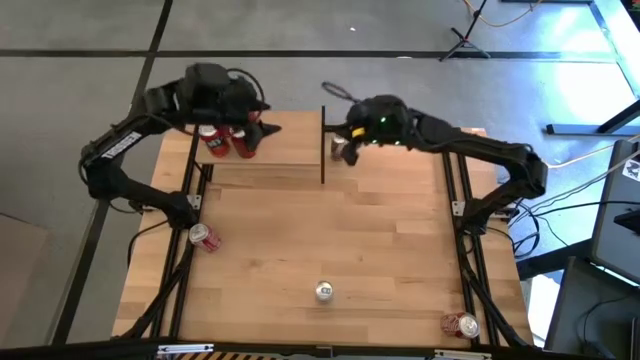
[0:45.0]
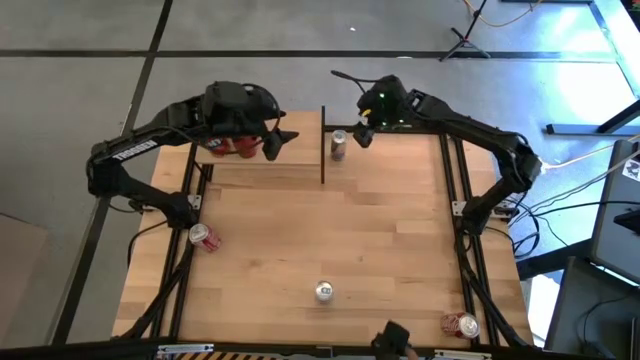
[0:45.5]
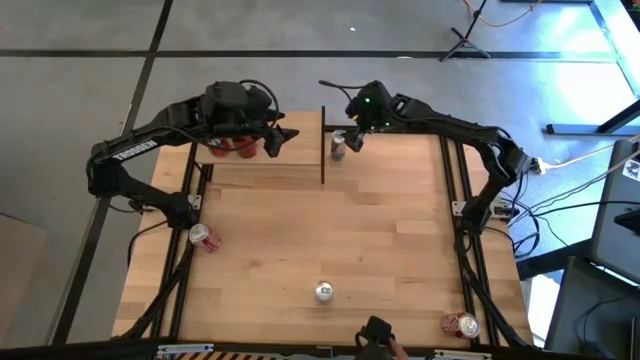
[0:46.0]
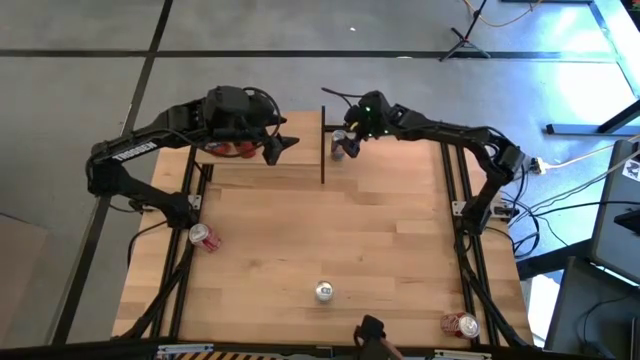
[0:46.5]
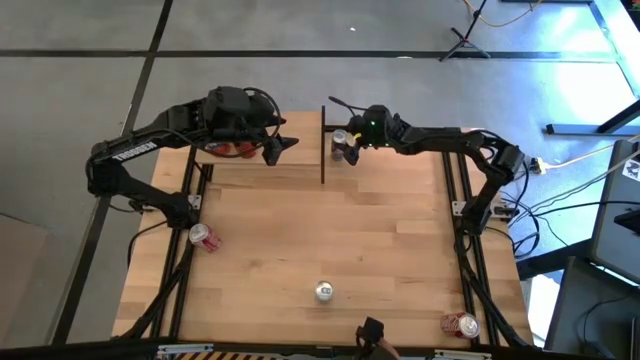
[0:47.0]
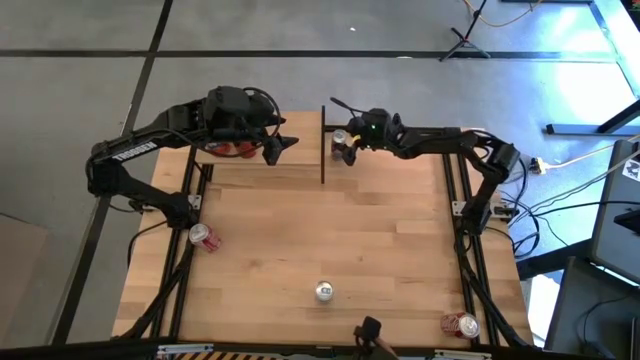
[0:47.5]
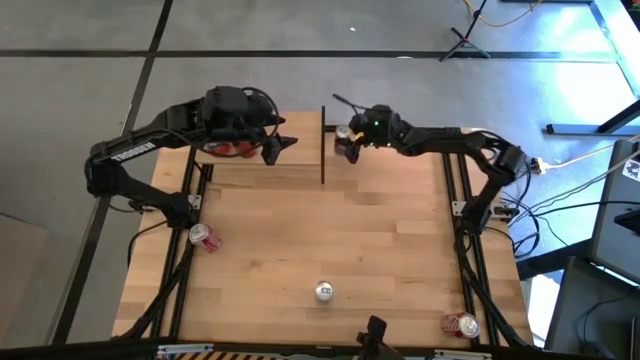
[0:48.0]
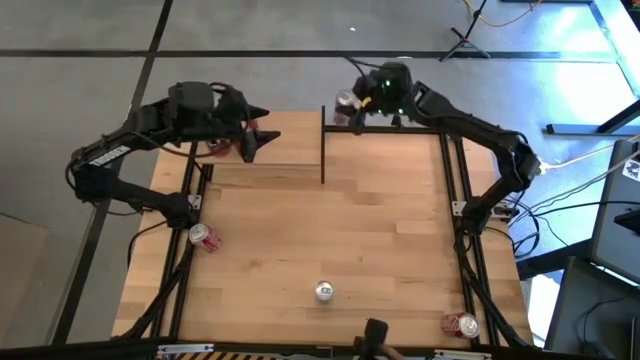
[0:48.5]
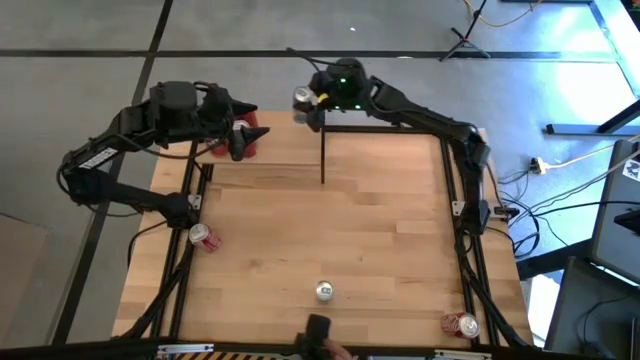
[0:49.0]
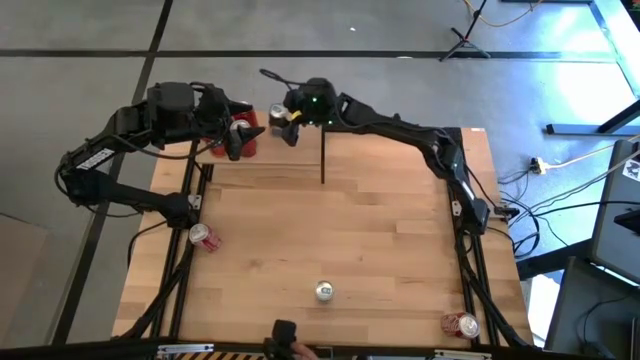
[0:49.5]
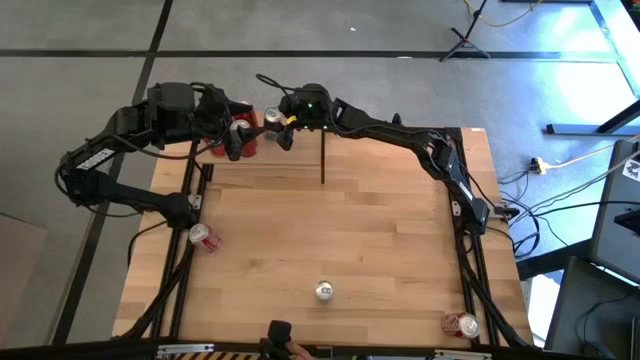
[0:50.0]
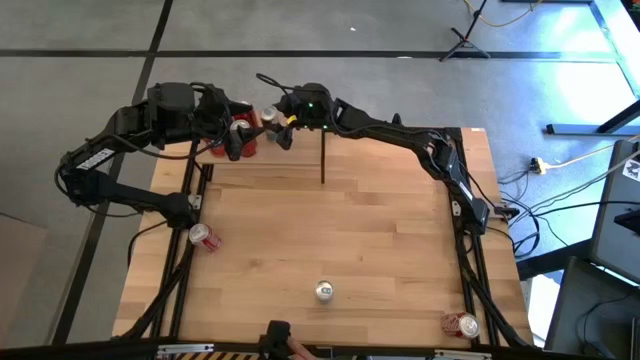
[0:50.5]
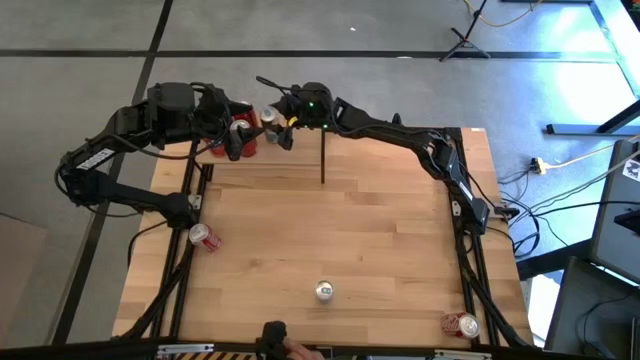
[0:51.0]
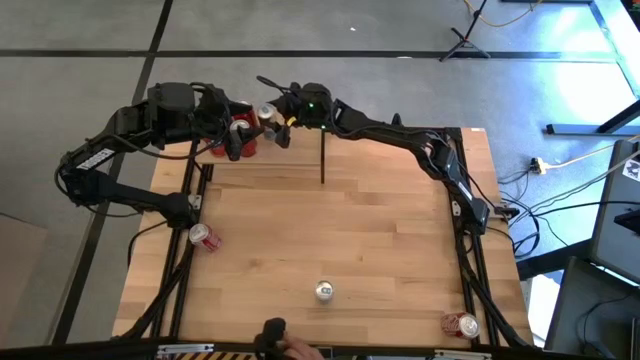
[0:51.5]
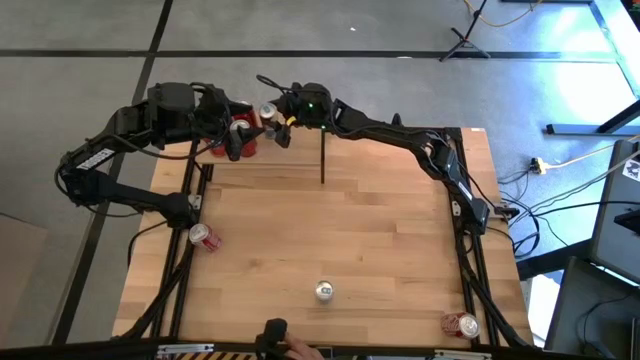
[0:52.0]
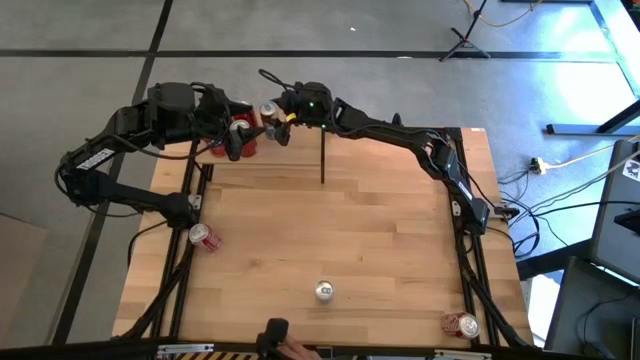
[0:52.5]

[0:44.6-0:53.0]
Task: Place canned beverage on shelf
Put the top blue soda can on the shelf

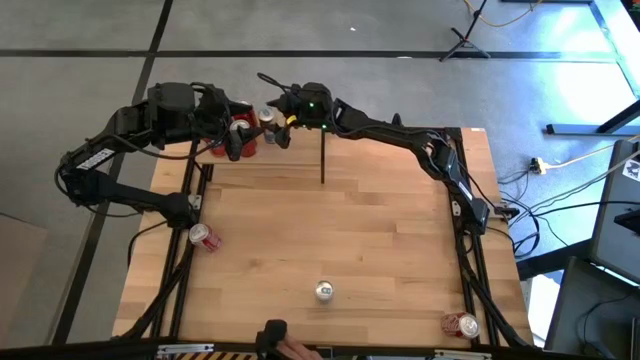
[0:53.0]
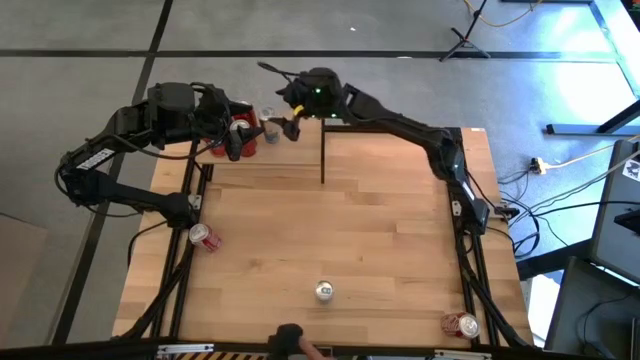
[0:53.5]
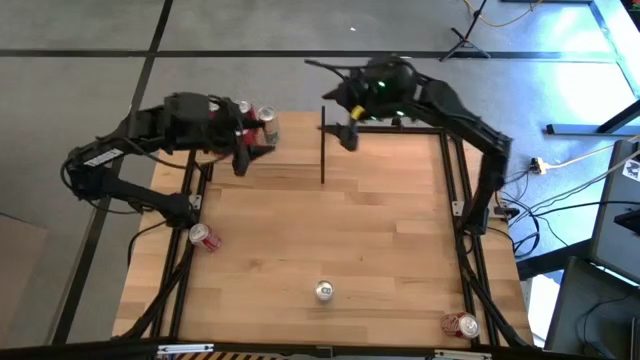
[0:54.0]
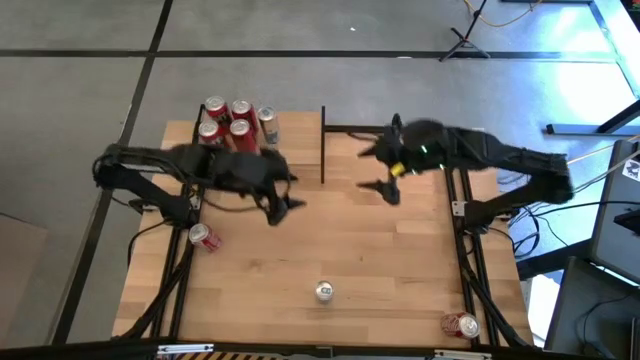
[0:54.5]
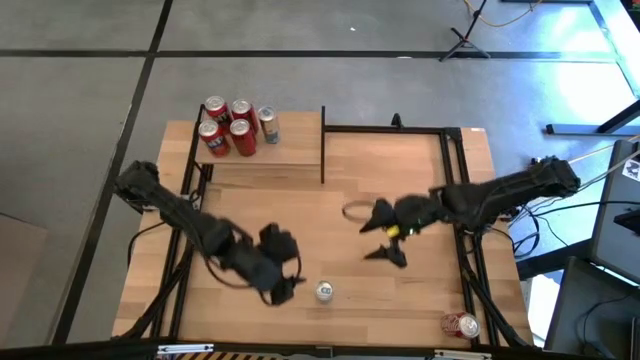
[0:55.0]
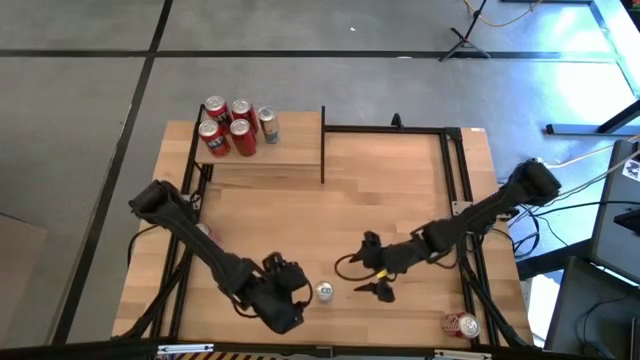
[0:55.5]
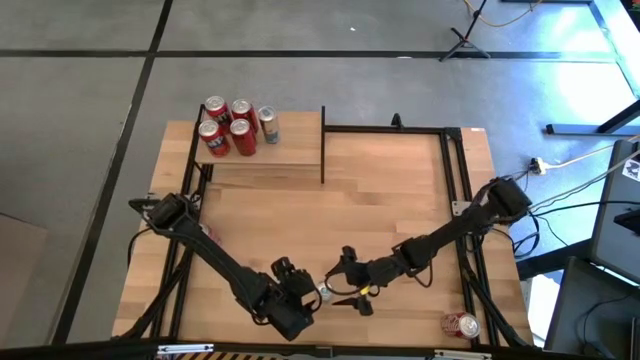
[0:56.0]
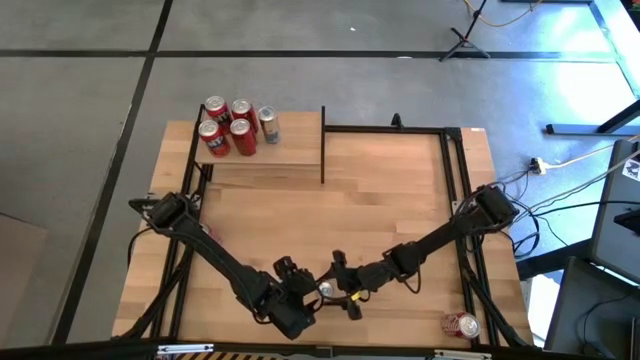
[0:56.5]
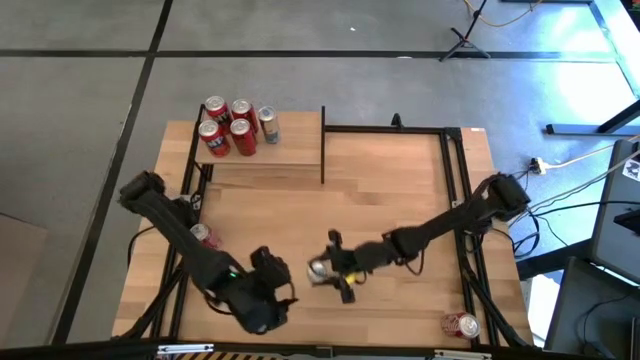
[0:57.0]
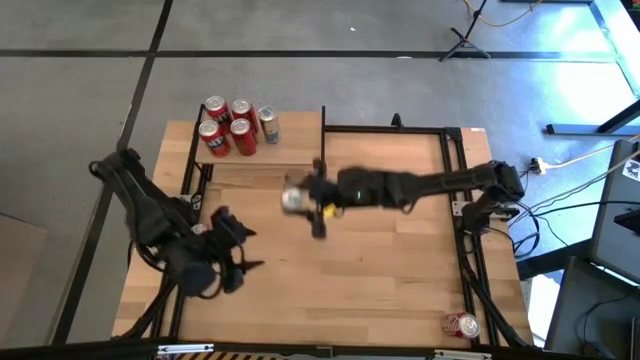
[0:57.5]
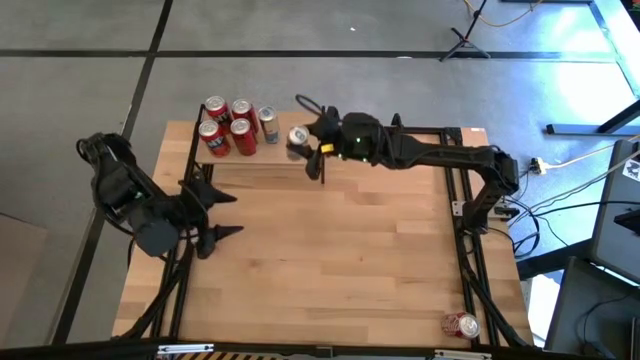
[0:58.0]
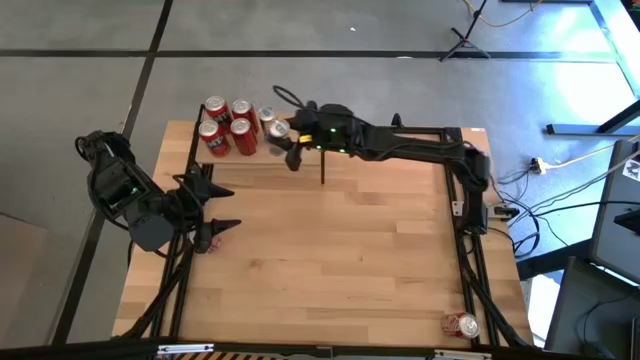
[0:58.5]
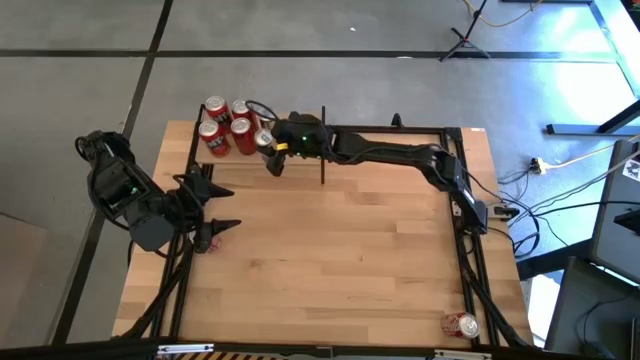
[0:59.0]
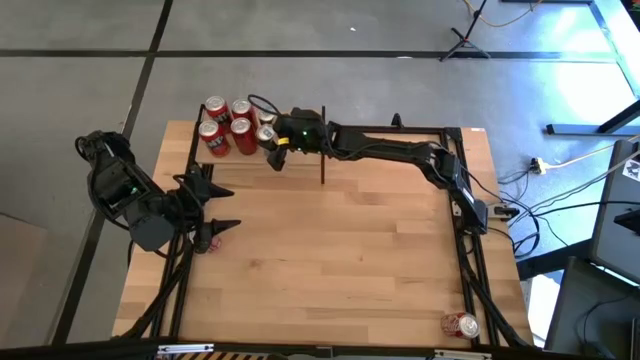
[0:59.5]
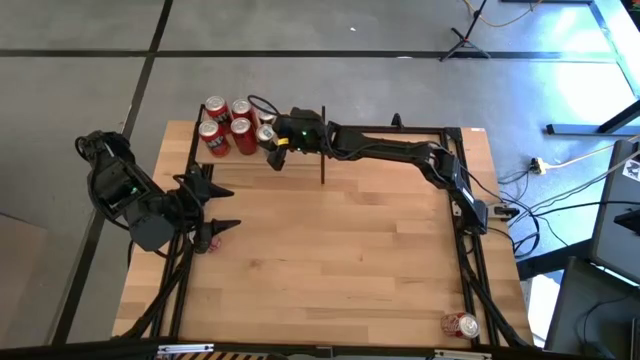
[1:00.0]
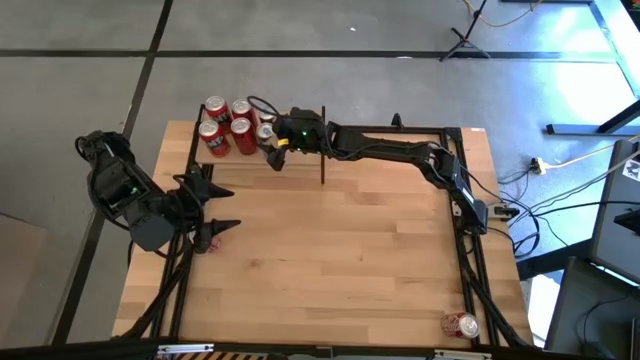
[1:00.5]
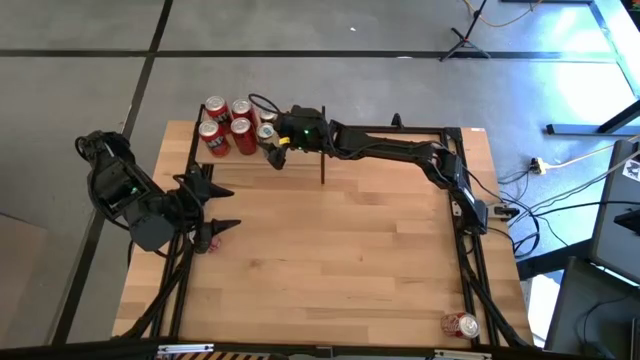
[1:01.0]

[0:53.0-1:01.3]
Put the blue soda can on the shelf aligned with the other blue soda can

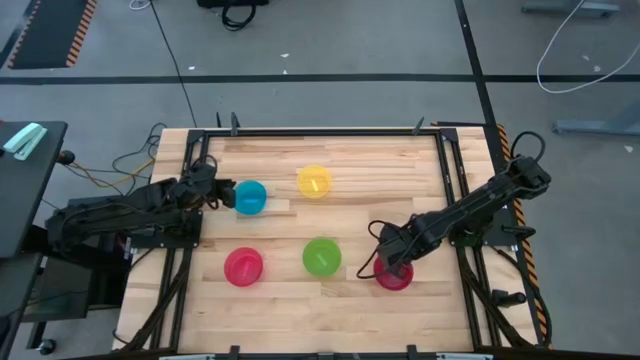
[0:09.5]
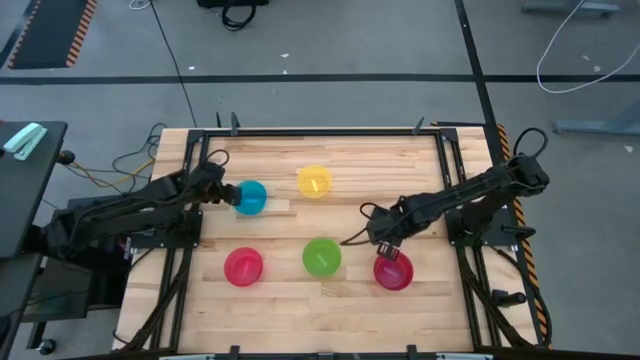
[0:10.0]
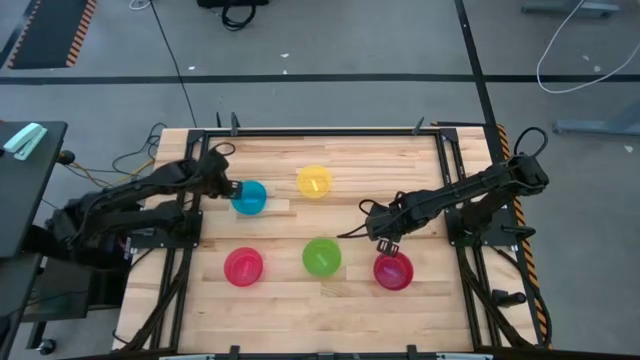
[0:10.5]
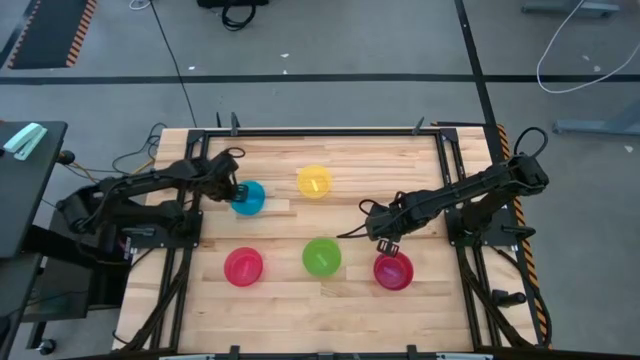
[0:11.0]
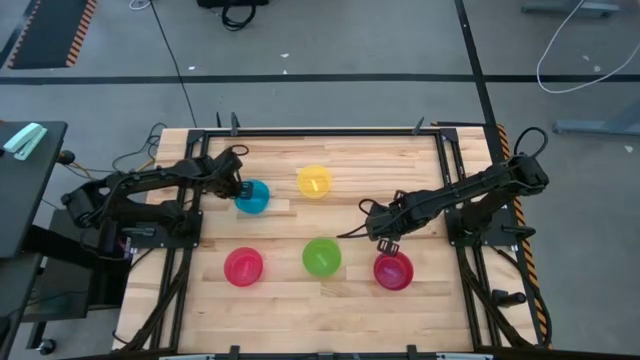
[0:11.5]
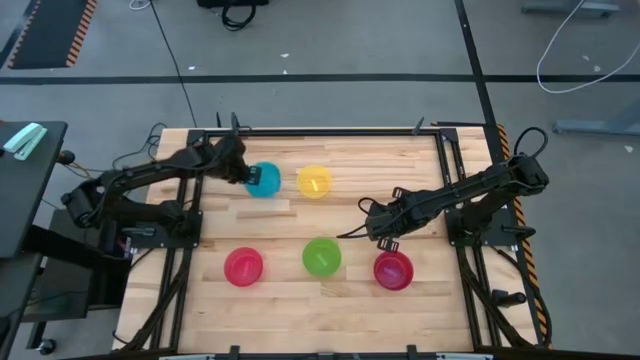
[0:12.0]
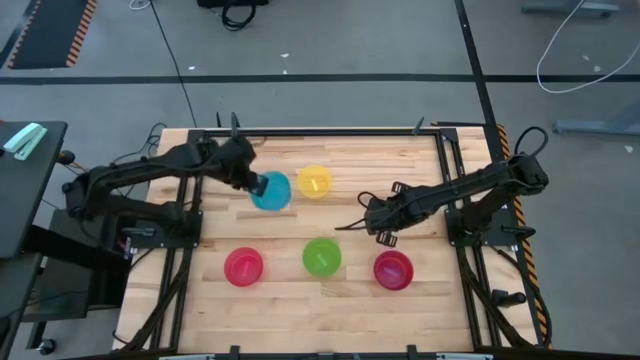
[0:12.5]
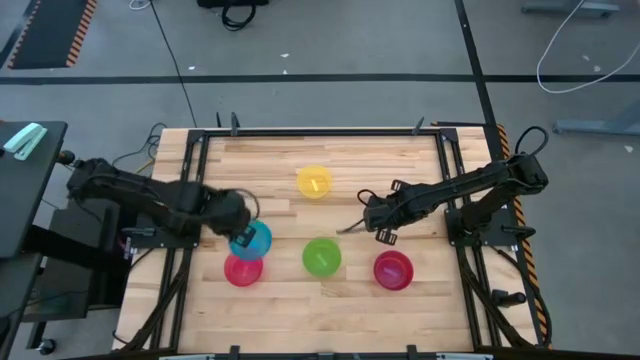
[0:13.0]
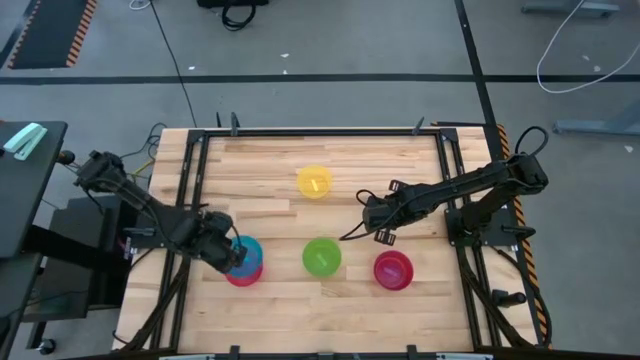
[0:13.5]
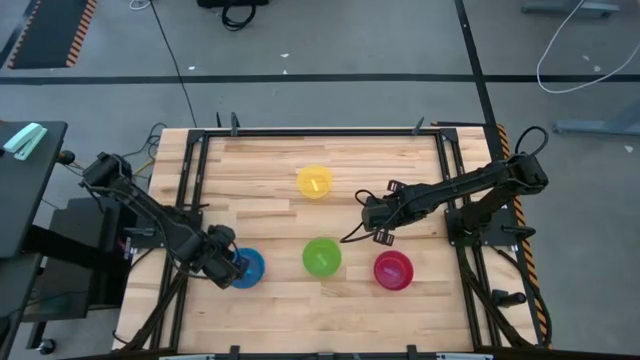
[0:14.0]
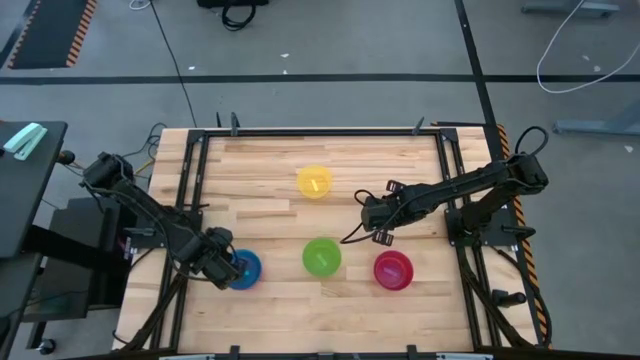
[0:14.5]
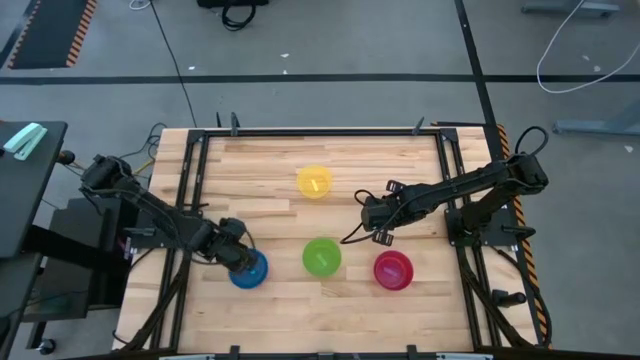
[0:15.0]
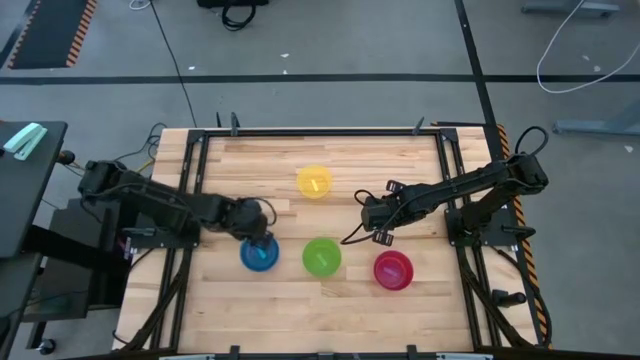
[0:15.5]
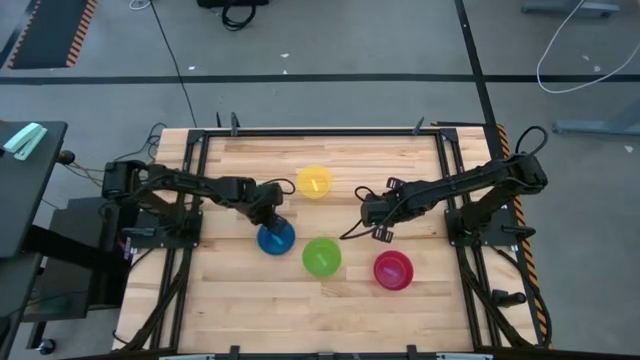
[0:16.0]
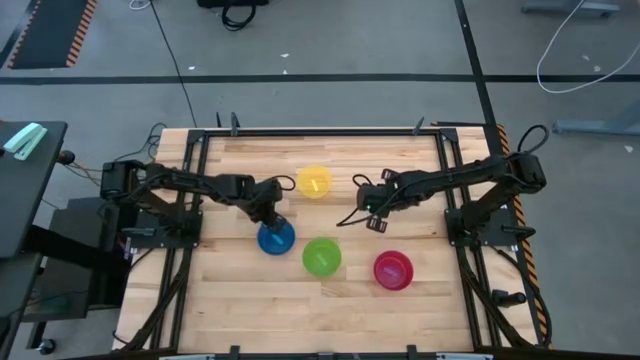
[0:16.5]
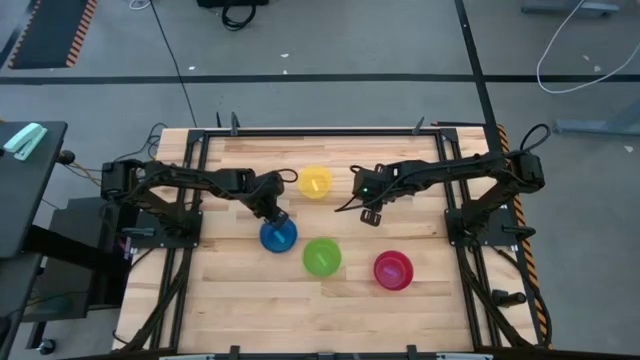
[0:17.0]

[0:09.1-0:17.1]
Task: Nest bowls inside each other
Stack the blue bowl on the red bowl
